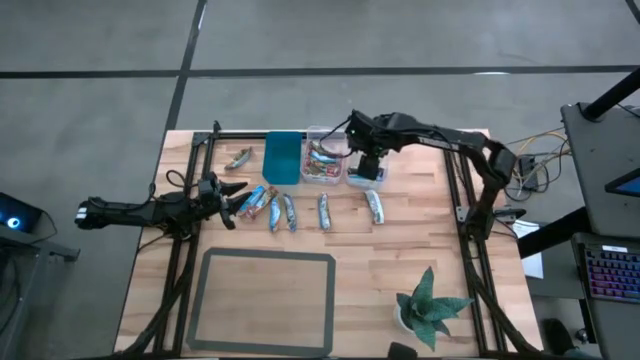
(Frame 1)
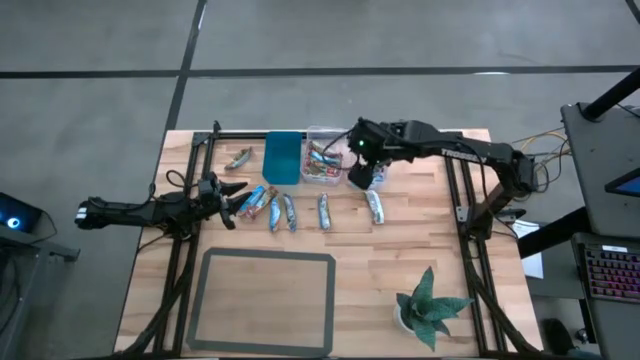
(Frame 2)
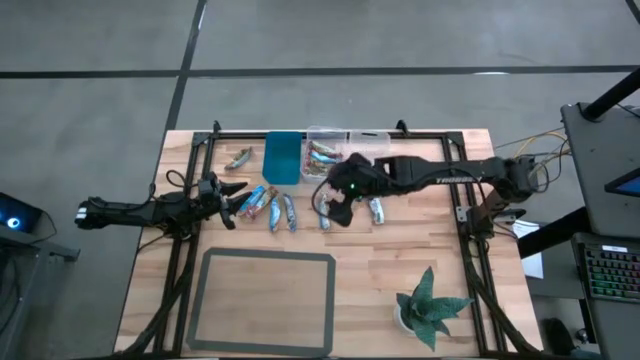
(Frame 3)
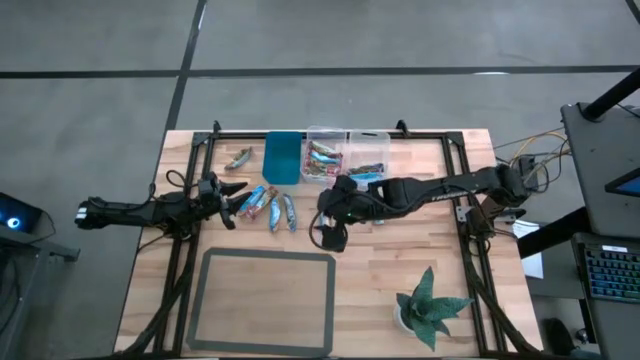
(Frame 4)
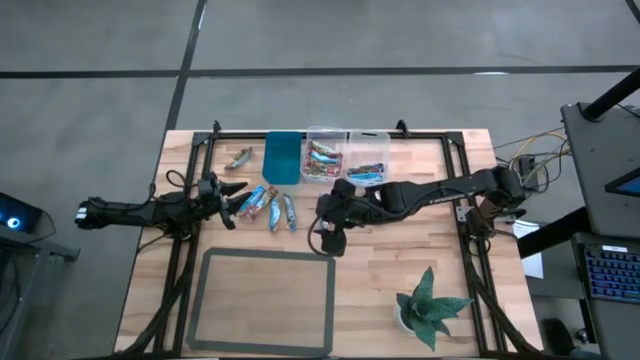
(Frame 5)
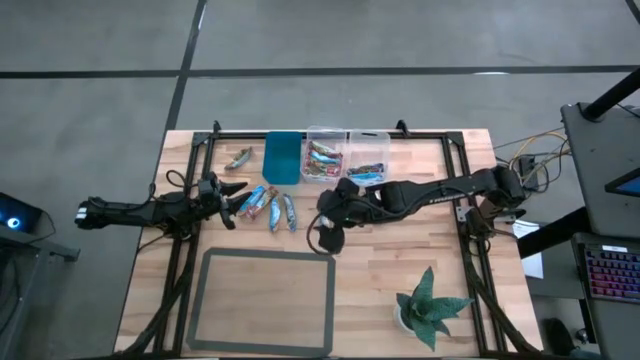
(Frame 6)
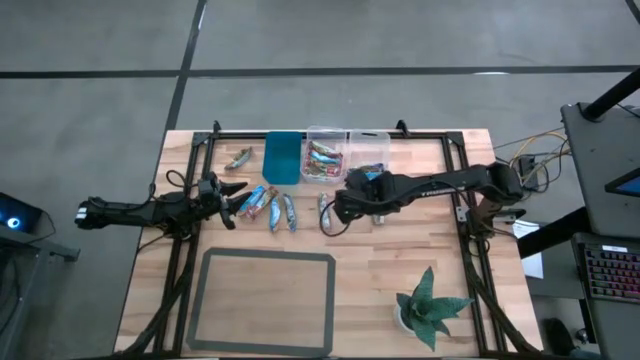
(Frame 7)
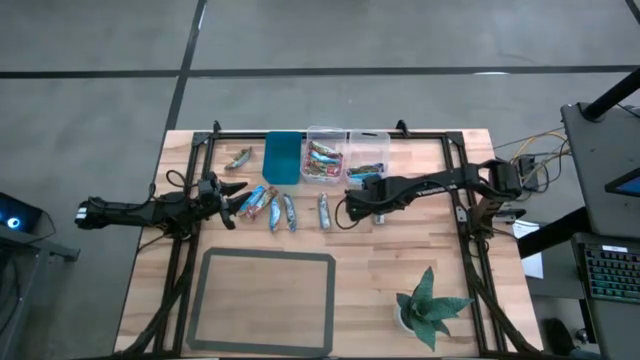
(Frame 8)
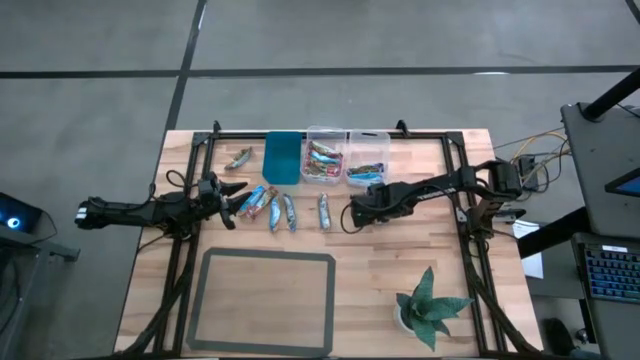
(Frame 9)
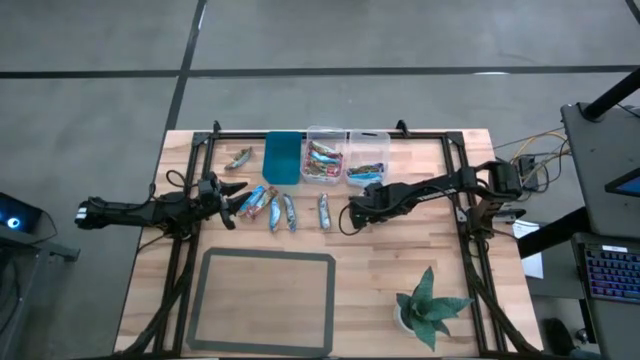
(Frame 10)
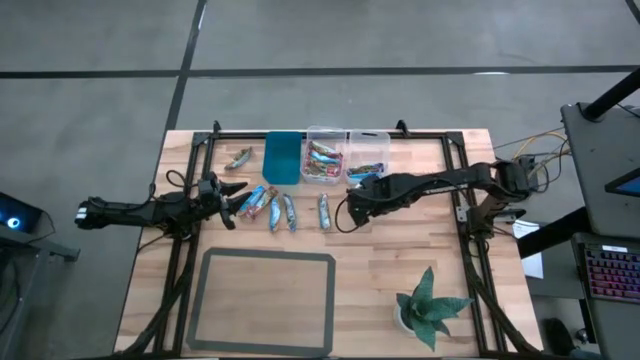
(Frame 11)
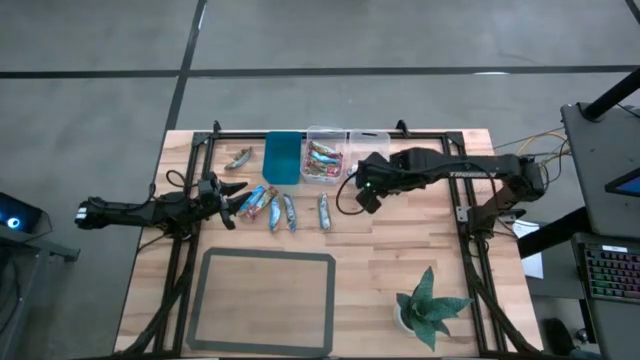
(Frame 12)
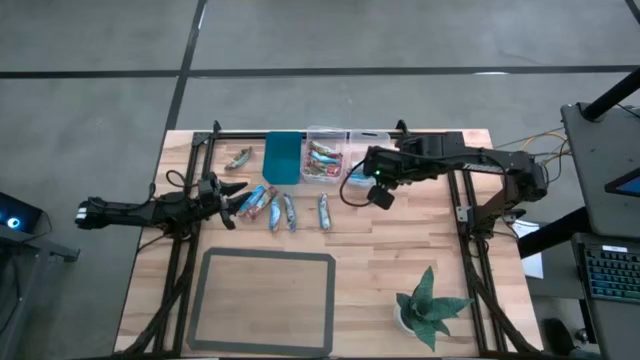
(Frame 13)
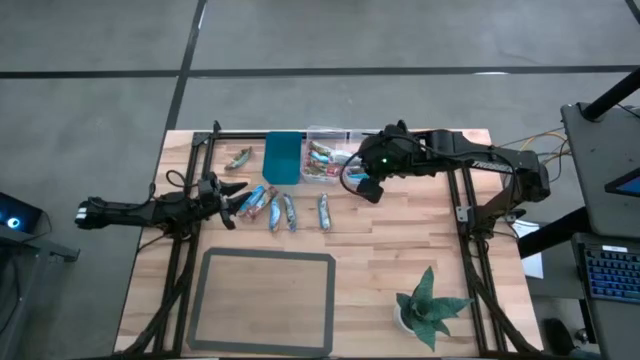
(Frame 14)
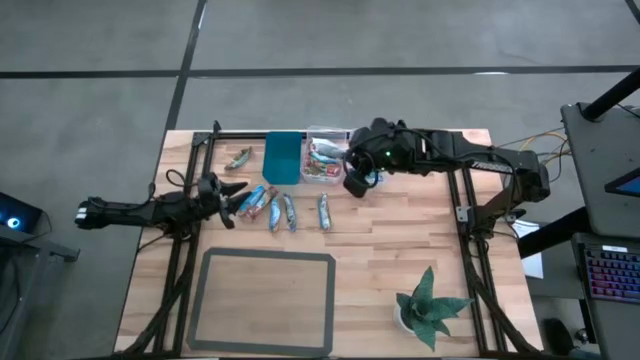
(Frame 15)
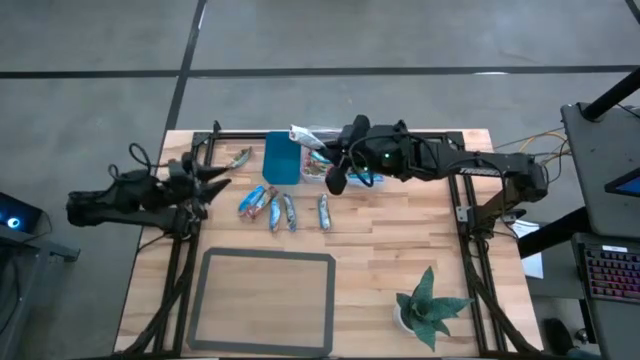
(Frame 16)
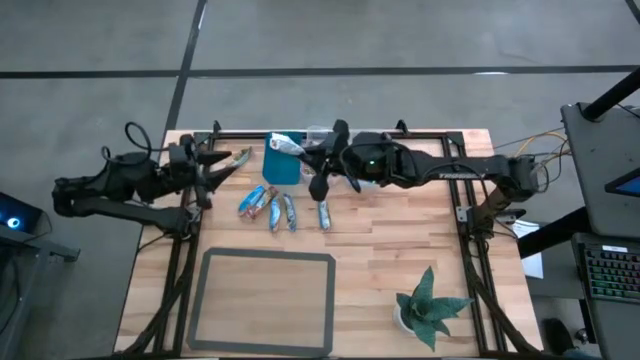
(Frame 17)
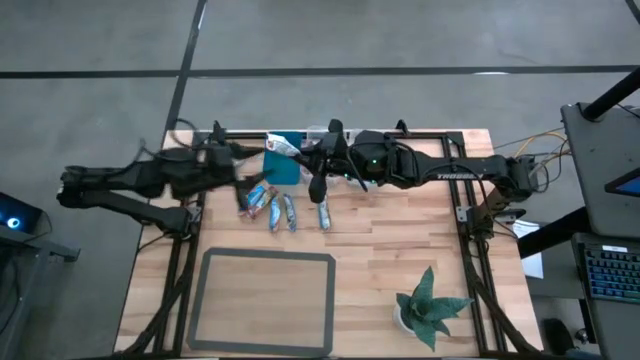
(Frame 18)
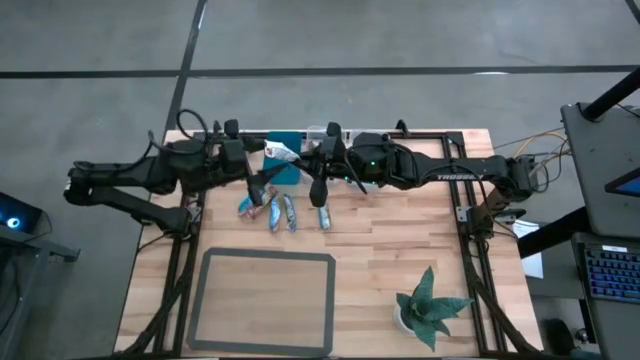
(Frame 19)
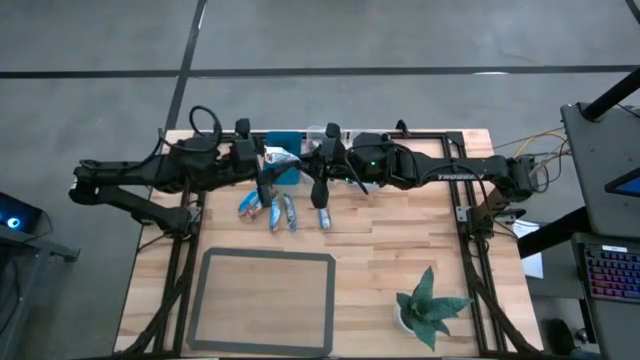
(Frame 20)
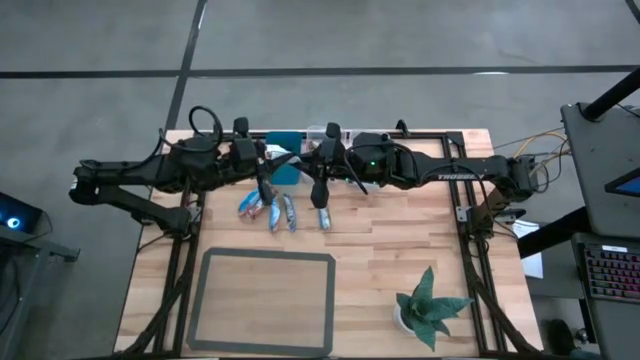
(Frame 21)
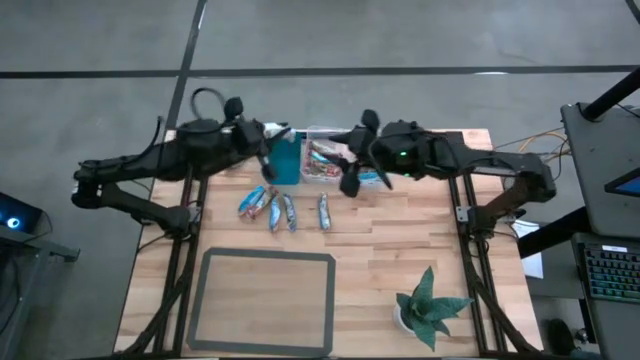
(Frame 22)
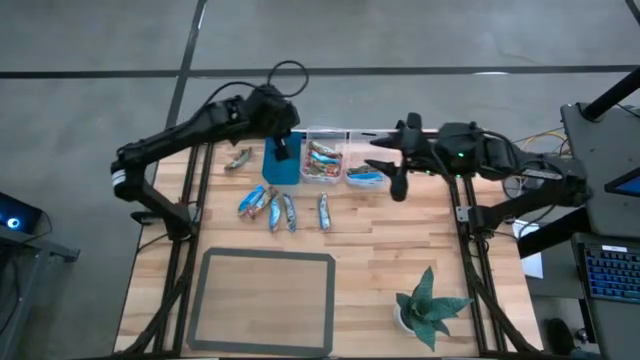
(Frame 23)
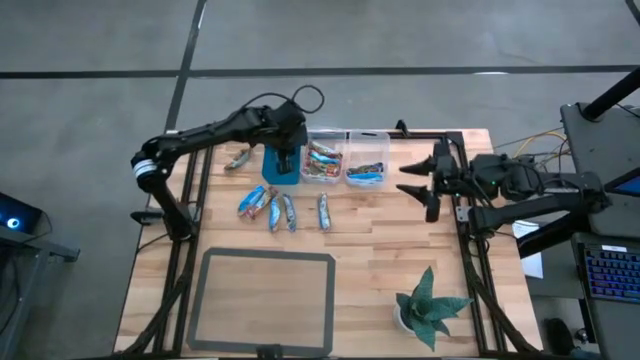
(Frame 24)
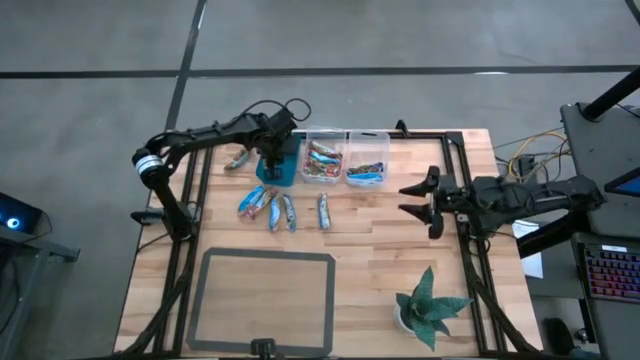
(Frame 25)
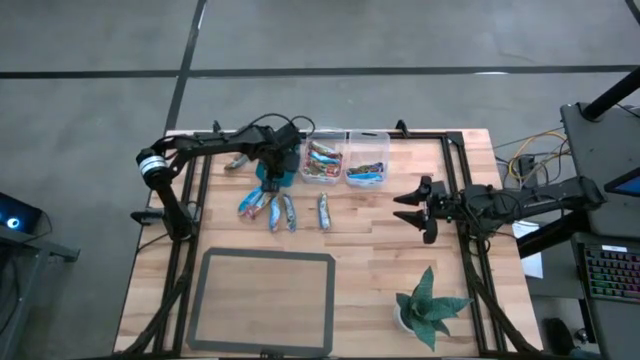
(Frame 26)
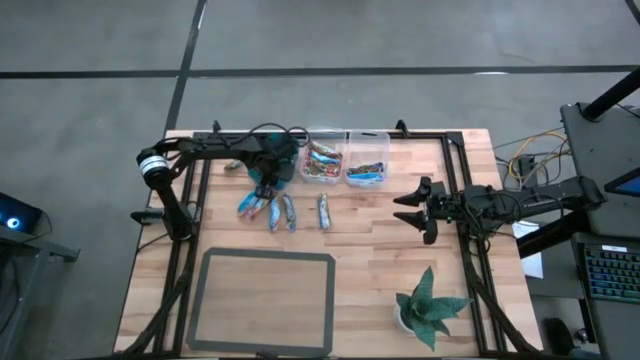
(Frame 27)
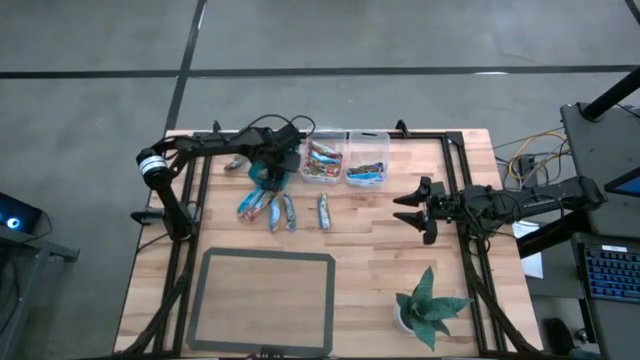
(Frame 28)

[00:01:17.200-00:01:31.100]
Task: Pick and place Granola Bars by type
Put the yellow granola bar into the blue bin

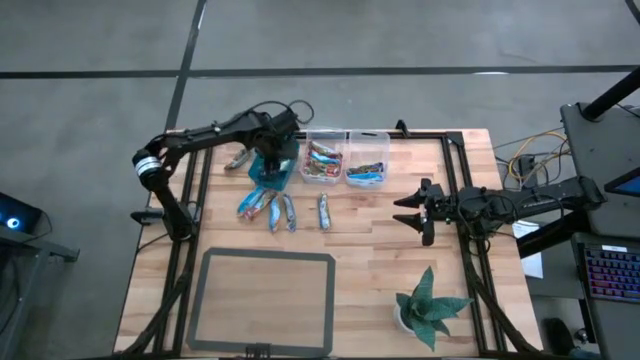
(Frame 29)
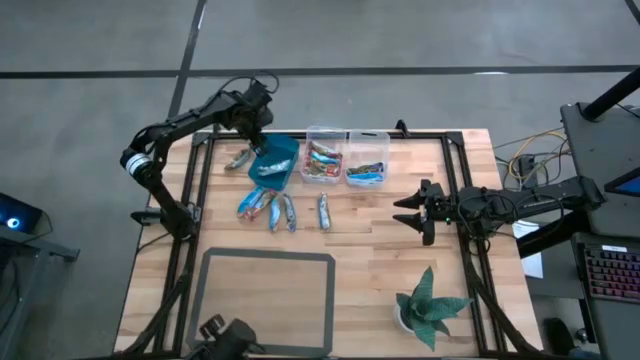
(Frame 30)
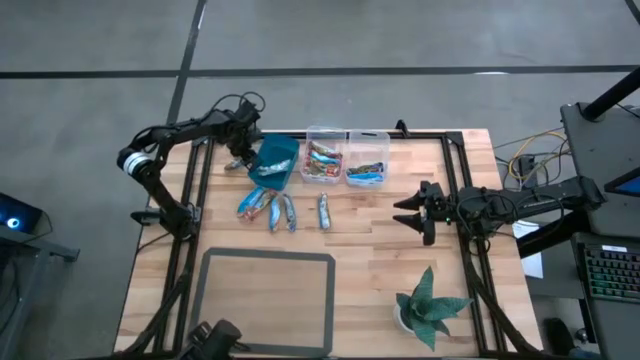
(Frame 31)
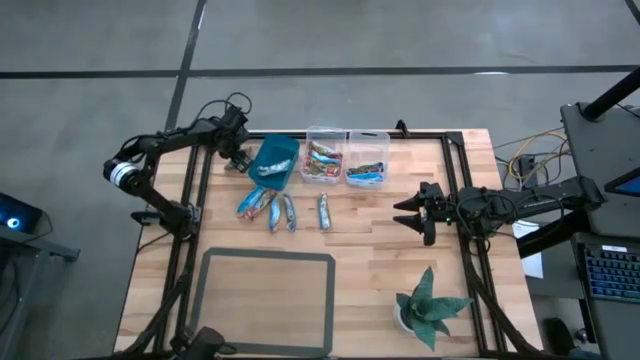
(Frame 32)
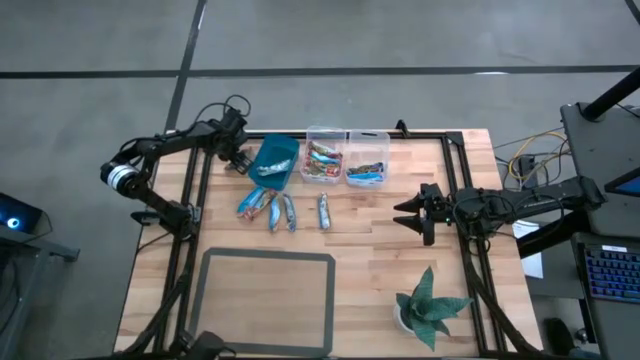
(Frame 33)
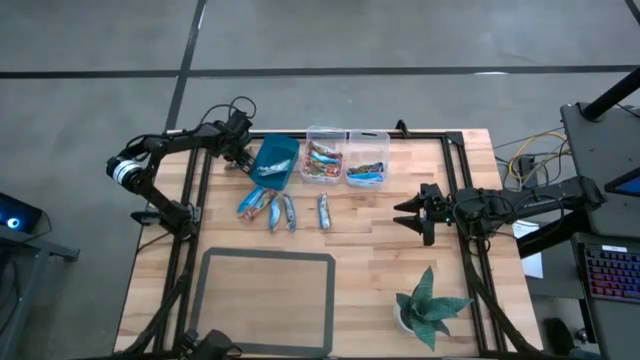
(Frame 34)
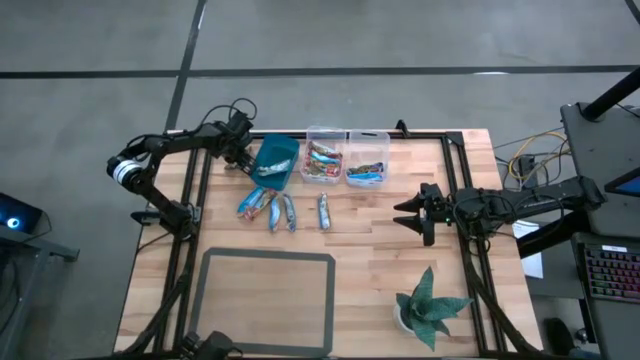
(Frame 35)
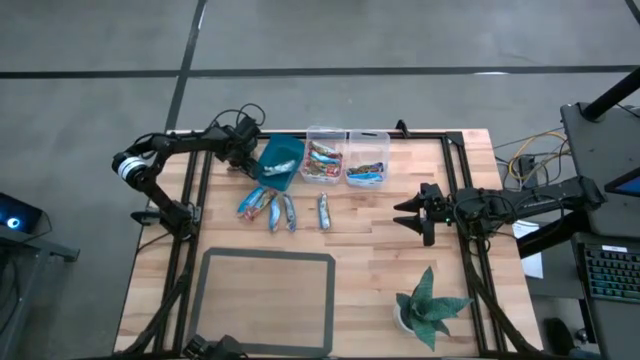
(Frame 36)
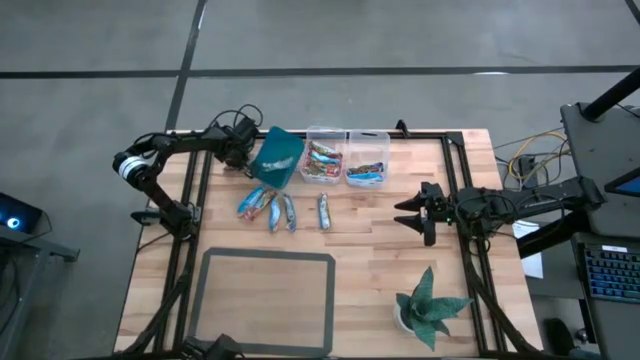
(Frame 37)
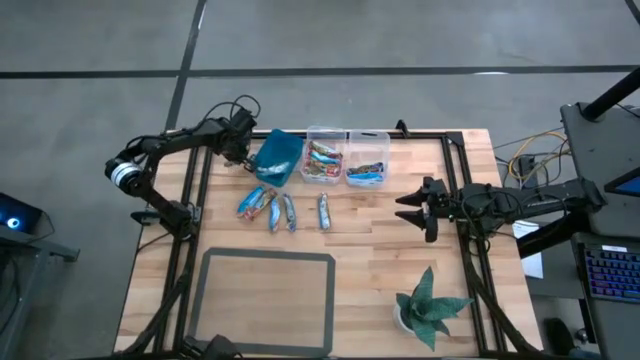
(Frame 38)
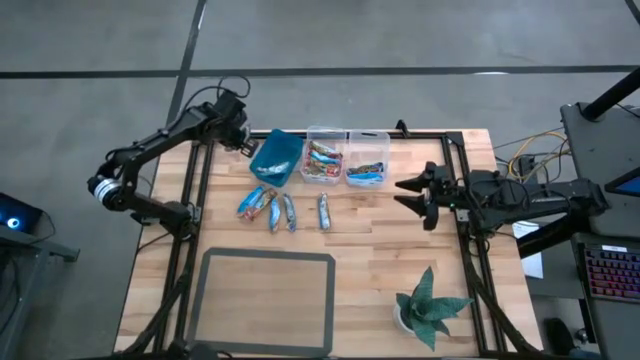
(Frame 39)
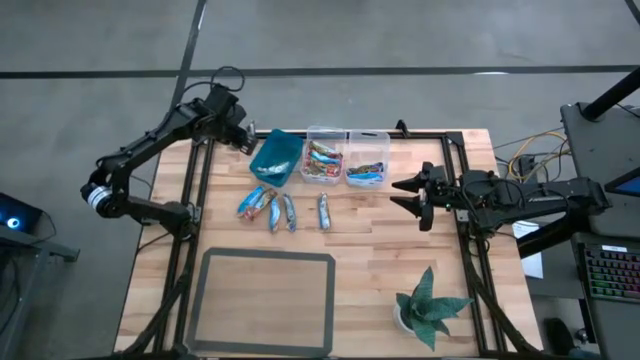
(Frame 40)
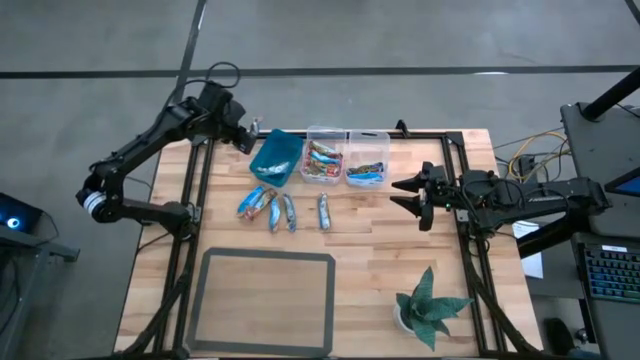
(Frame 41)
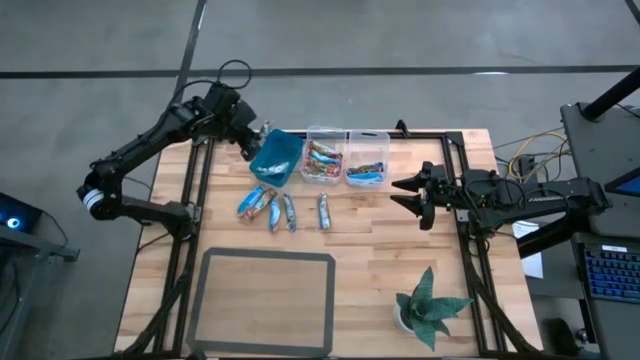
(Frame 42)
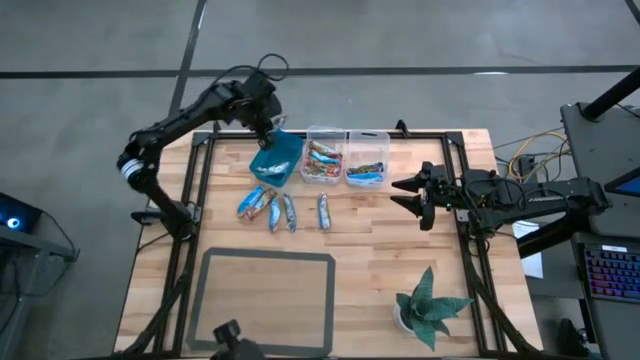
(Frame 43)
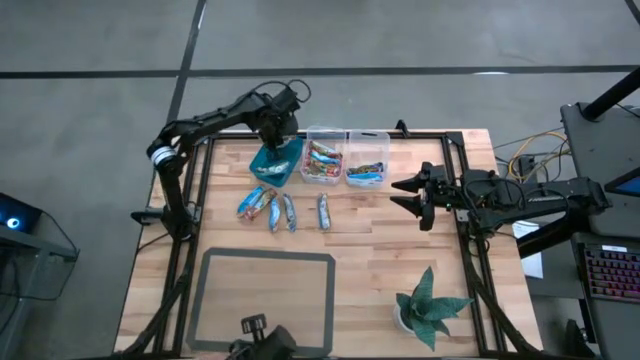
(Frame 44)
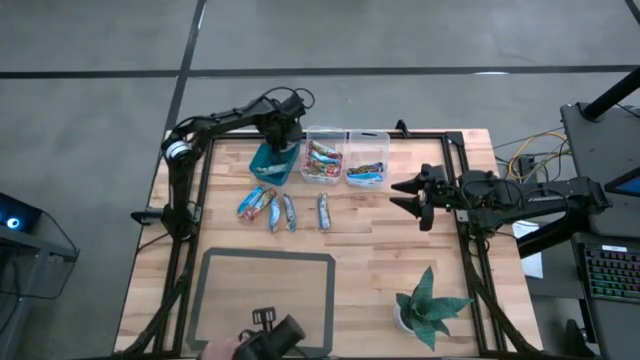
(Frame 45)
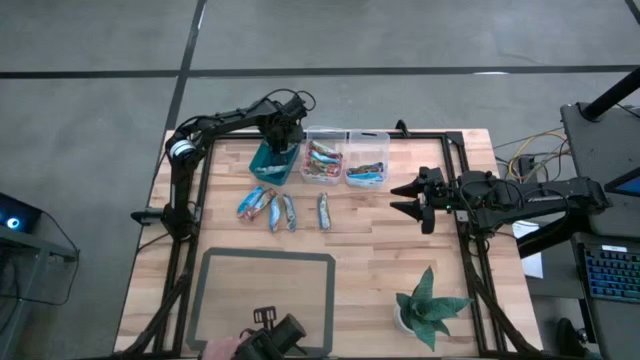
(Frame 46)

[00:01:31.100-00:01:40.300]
Put the yellow granola bar into the blue bin
